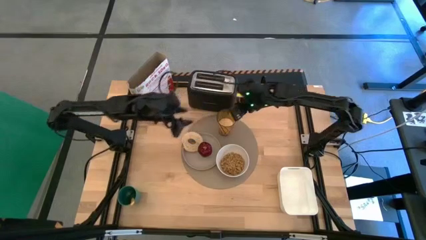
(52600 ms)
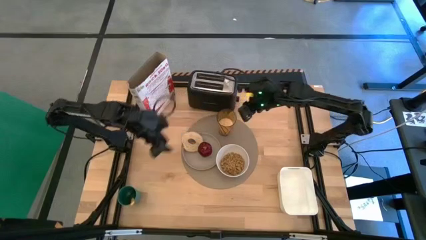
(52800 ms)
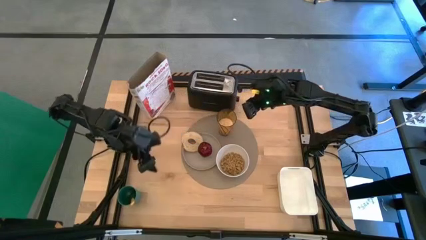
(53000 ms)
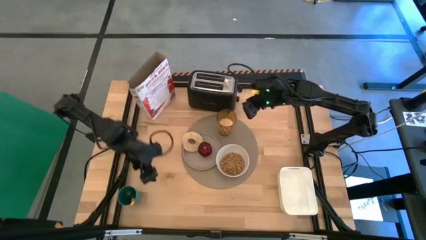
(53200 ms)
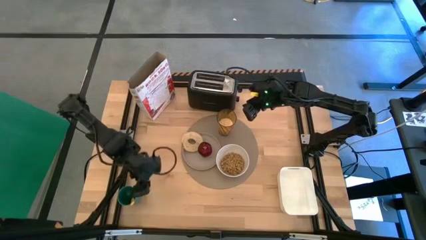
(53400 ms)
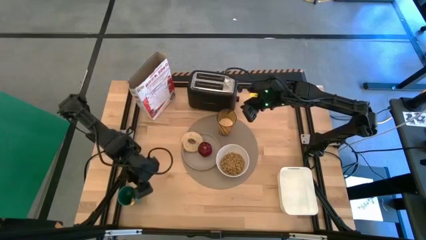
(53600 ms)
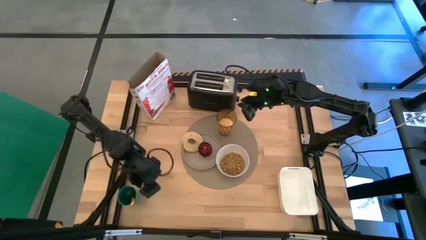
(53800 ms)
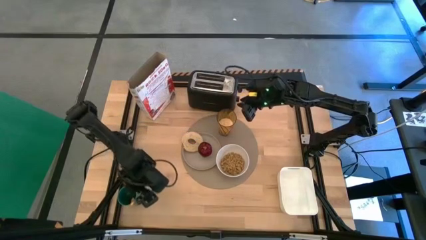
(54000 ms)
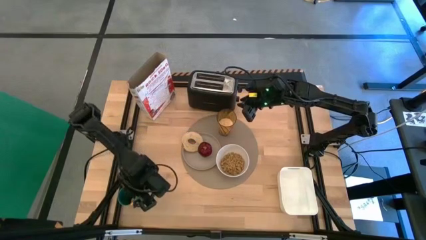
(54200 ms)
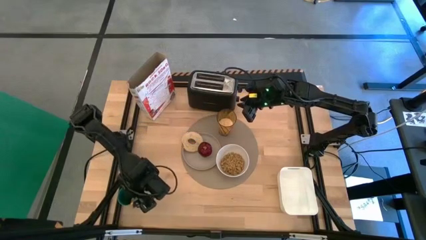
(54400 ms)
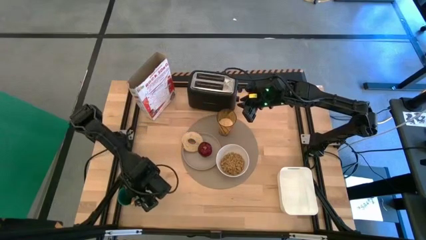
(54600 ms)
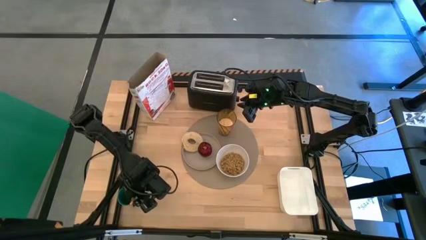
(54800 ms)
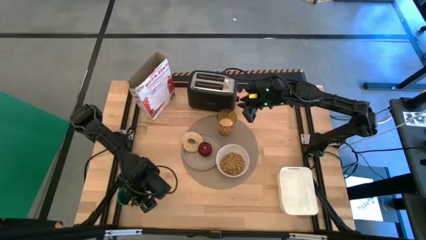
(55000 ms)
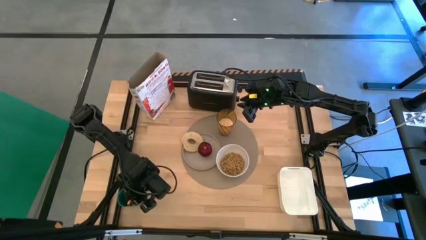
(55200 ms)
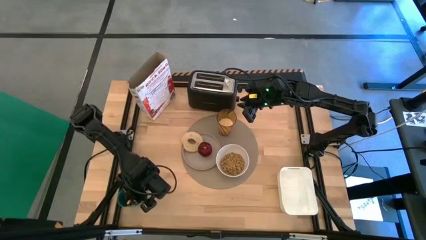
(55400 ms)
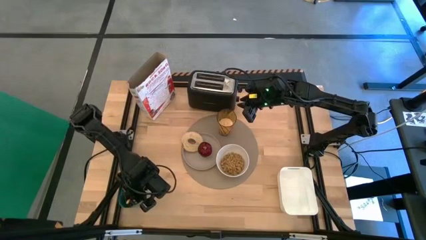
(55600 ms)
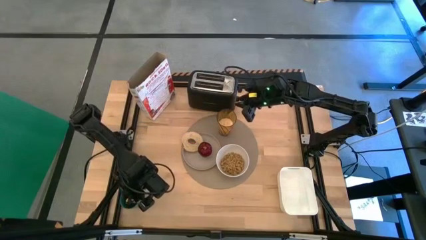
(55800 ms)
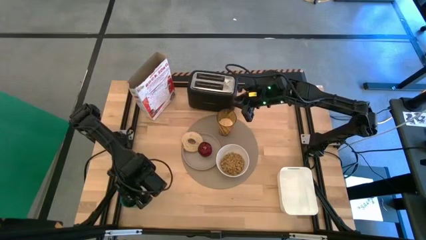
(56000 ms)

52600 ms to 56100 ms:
Task: Arrange a breakfast setting
Put the yellow spoon on the placemat to the right of the white bowl

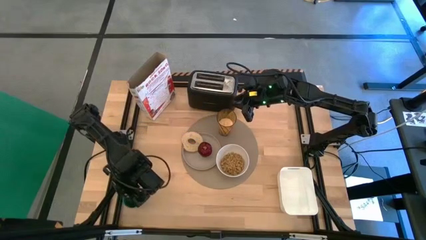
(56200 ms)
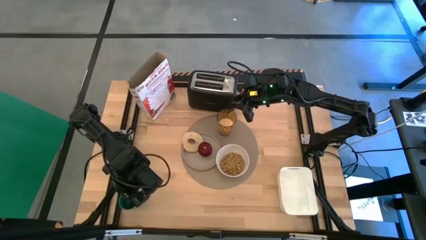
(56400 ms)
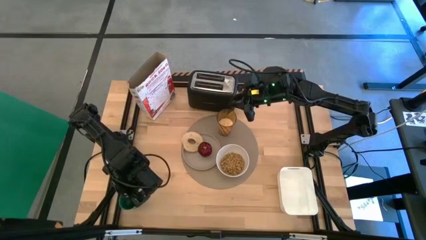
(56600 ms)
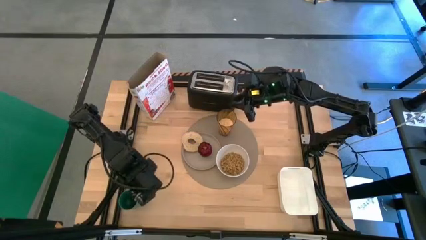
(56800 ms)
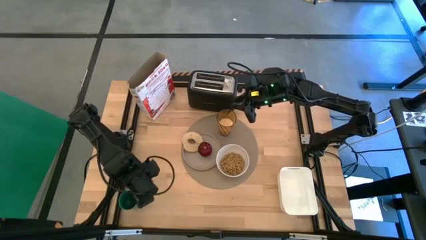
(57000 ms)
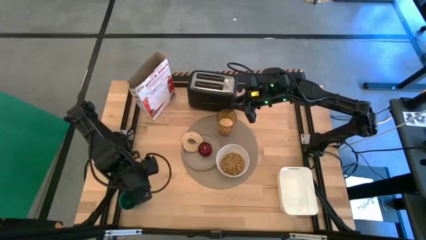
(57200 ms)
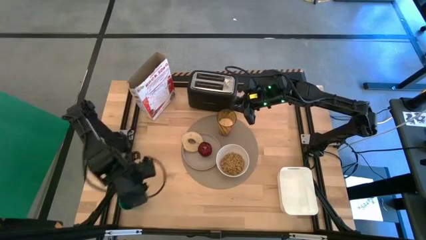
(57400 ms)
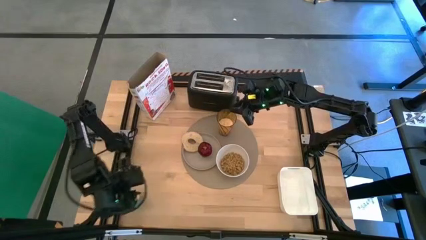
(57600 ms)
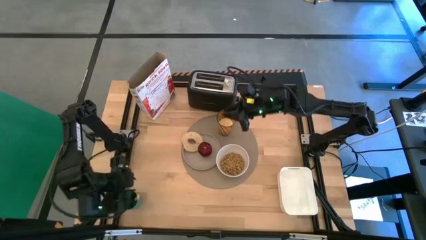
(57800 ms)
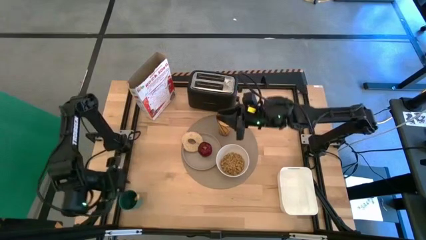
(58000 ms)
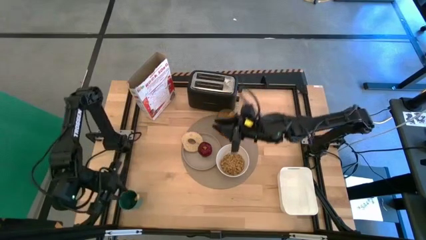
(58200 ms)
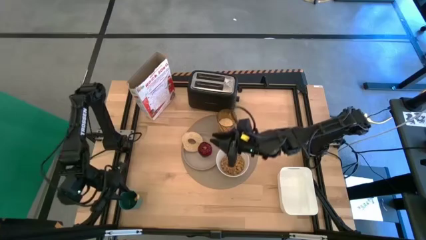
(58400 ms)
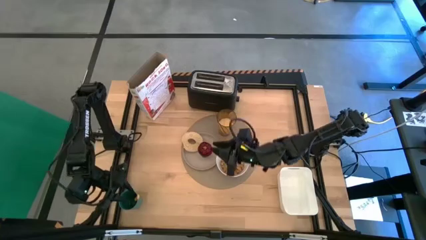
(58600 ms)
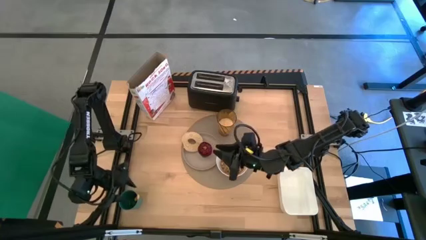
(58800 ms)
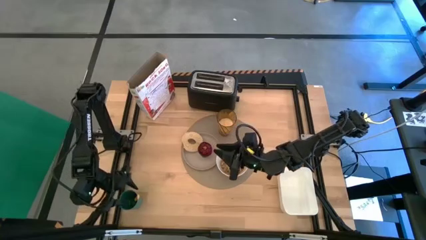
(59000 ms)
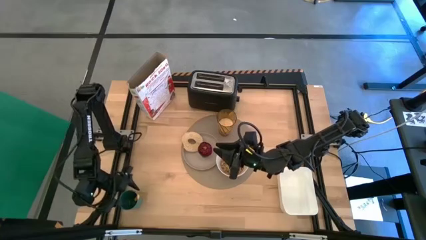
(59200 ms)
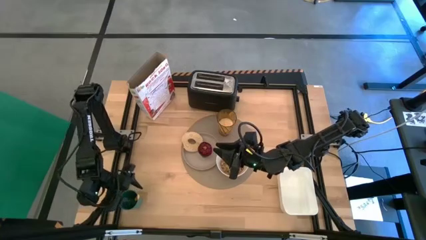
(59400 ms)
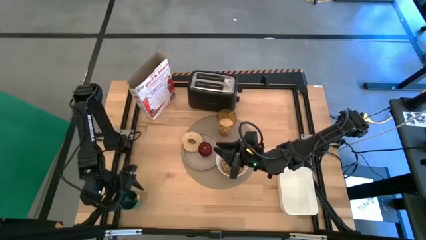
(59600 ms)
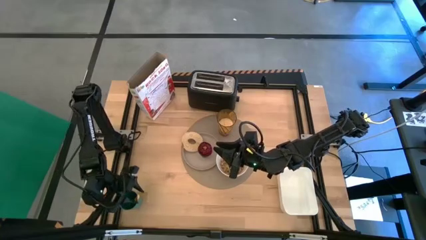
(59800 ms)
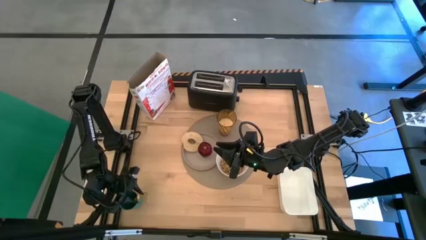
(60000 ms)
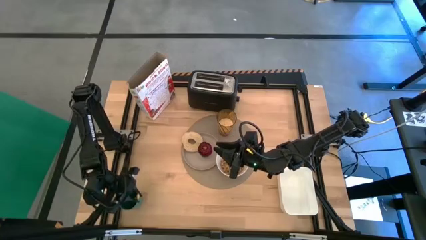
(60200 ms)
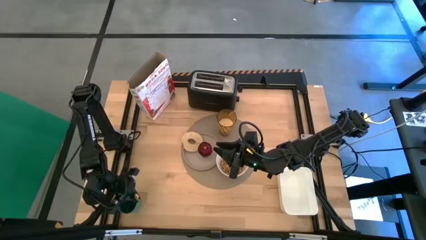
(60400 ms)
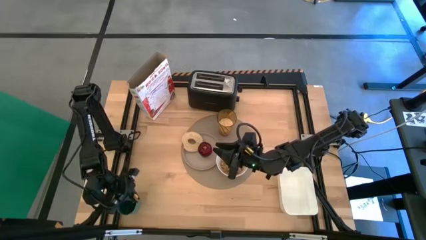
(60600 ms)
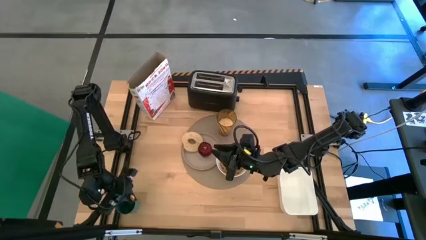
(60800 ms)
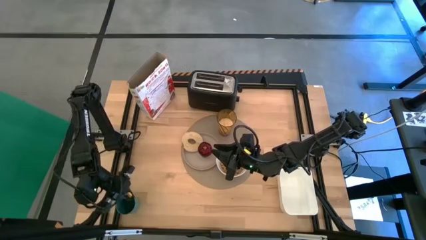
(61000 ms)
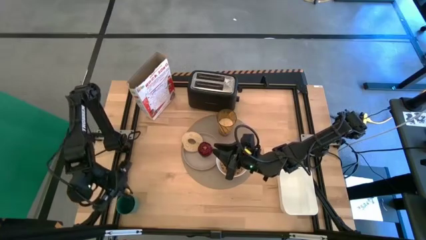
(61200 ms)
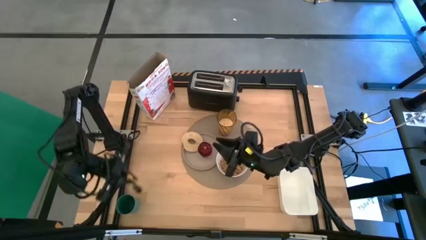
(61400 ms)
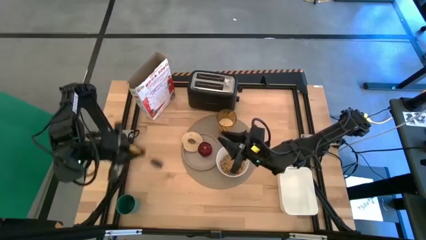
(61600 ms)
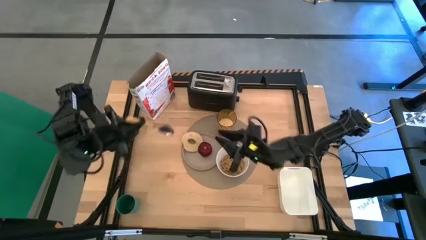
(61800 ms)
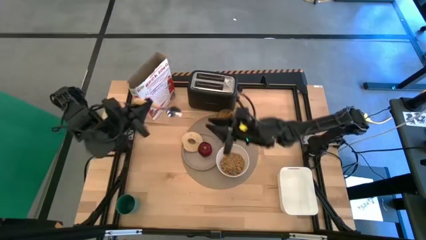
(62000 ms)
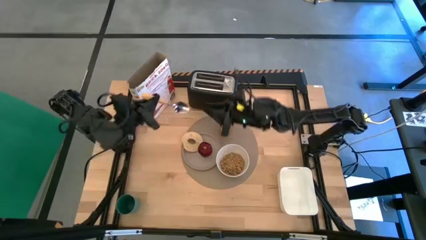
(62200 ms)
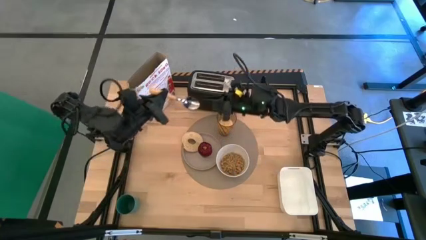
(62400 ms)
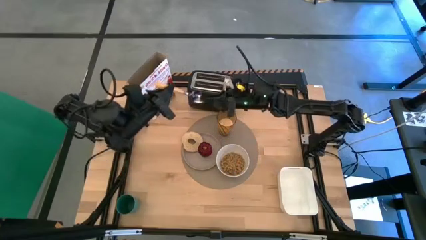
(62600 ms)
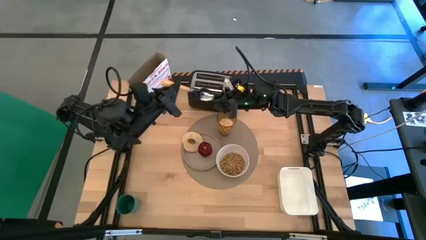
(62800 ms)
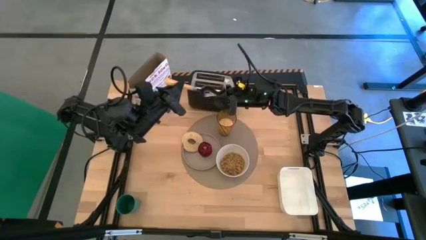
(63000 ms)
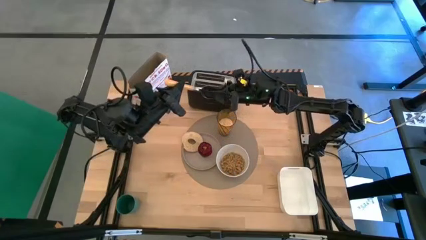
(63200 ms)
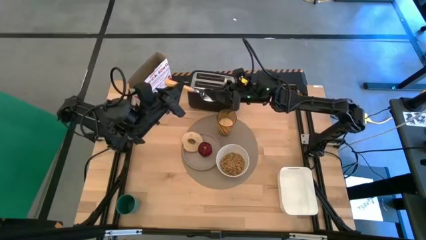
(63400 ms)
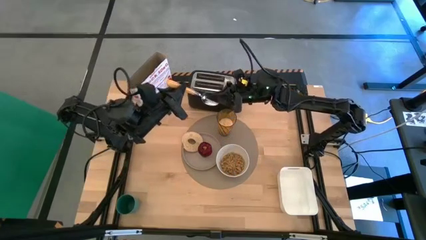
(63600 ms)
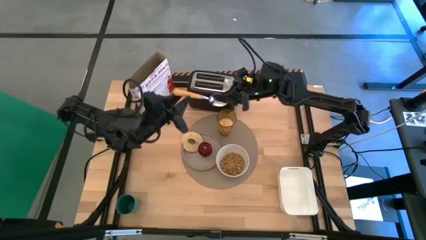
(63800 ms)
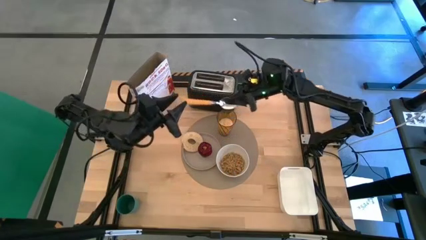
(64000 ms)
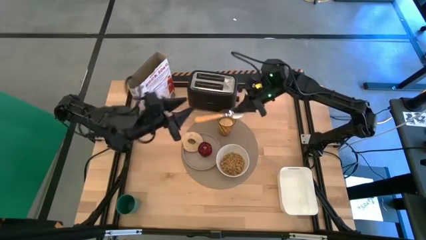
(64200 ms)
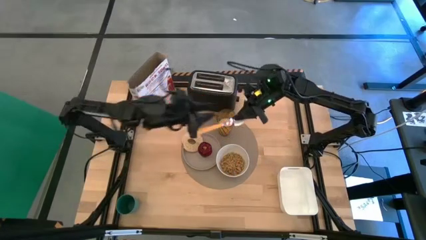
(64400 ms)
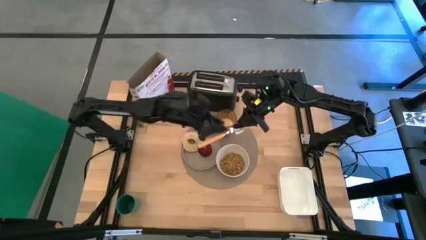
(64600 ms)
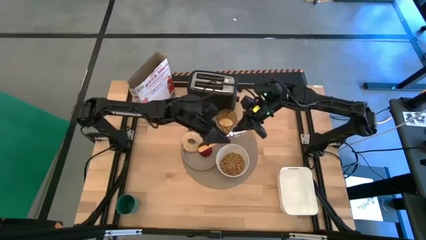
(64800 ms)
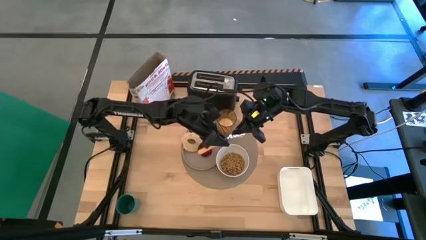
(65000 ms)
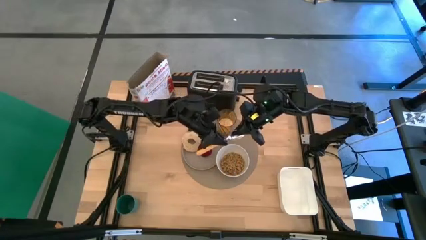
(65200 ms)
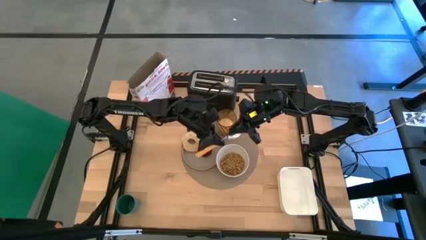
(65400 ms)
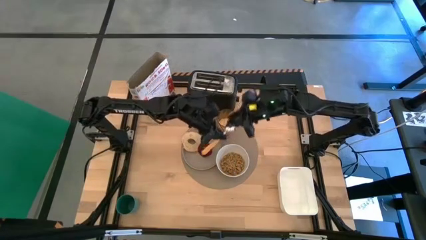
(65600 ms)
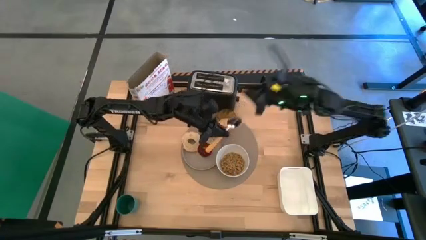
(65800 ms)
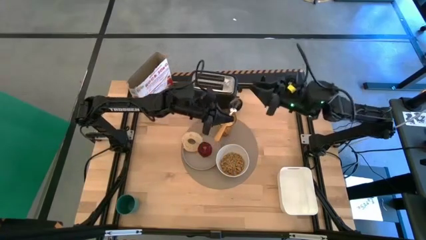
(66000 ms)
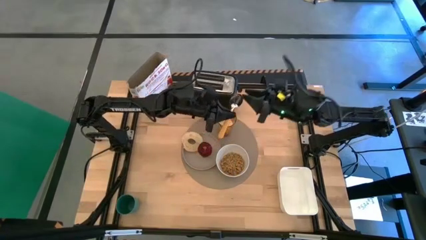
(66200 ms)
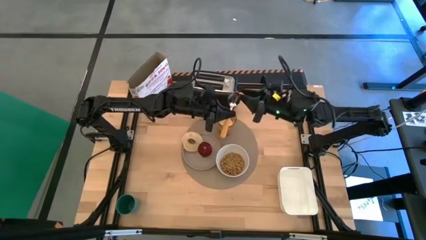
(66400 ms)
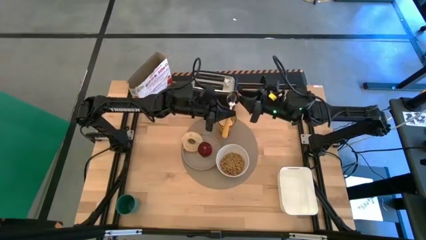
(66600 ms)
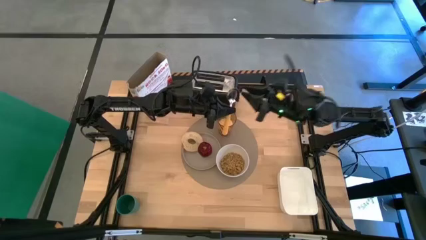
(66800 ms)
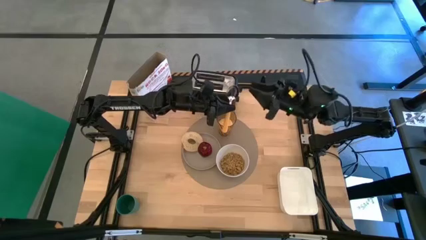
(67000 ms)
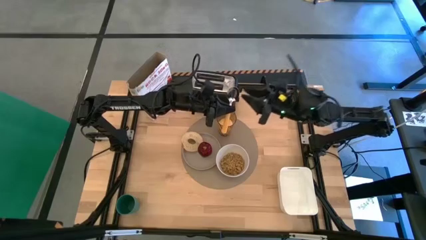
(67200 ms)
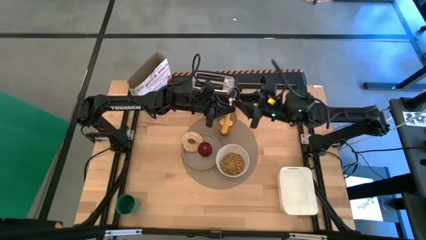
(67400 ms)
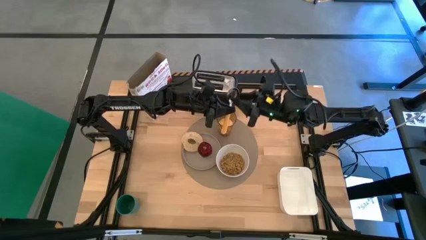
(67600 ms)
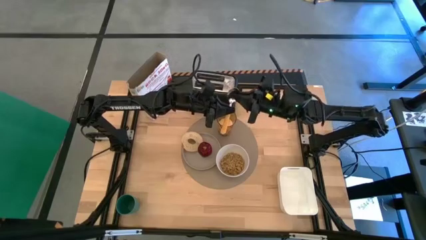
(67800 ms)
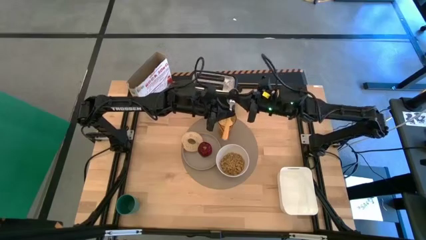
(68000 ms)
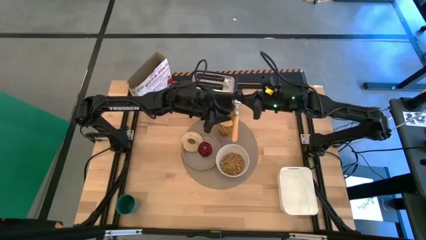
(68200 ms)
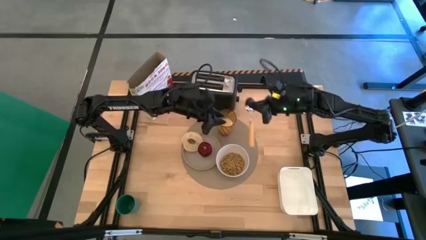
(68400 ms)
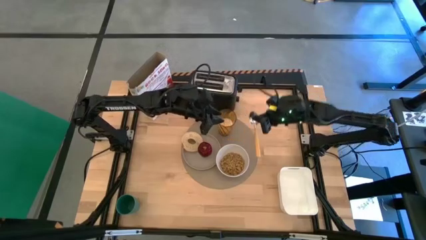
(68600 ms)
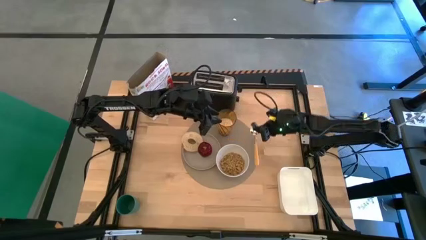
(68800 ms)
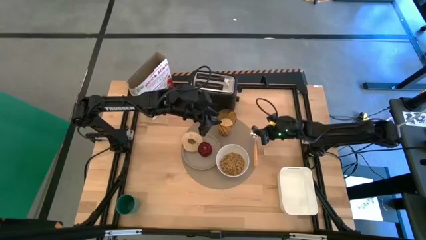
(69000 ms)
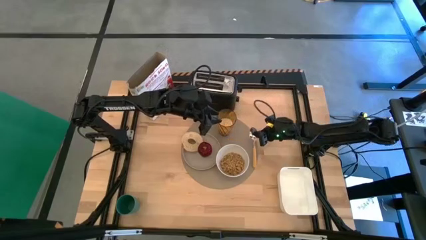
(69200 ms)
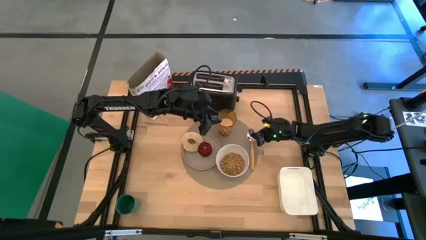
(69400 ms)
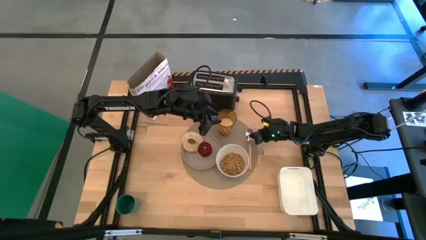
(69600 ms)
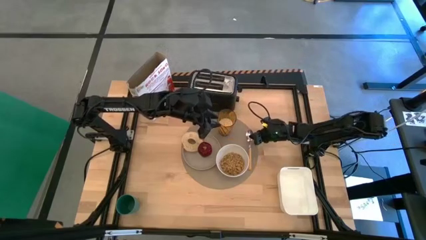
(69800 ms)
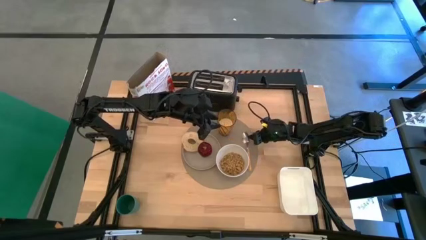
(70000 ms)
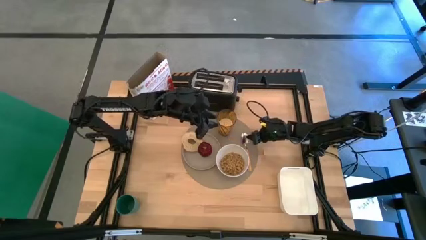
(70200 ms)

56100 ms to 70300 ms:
Put the yellow spoon on the placemat to the right of the white bowl
